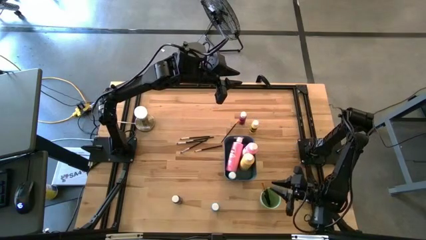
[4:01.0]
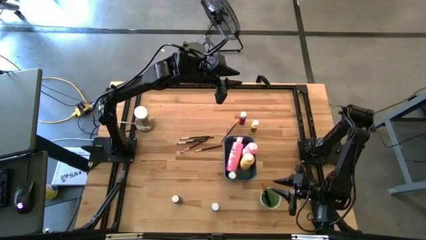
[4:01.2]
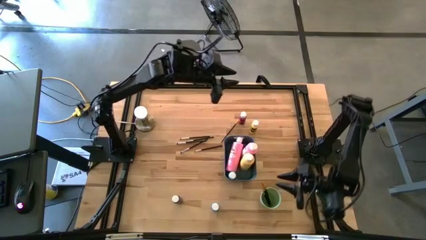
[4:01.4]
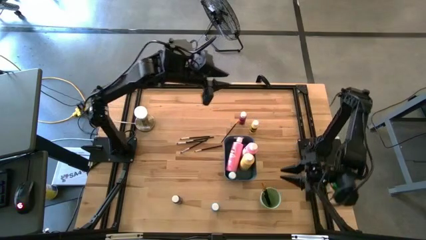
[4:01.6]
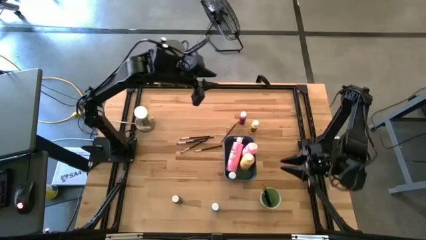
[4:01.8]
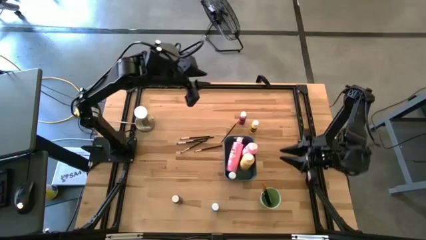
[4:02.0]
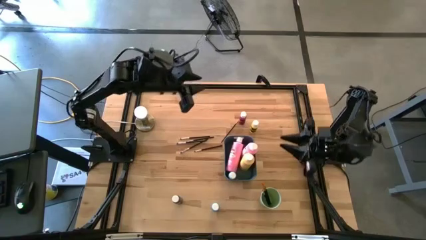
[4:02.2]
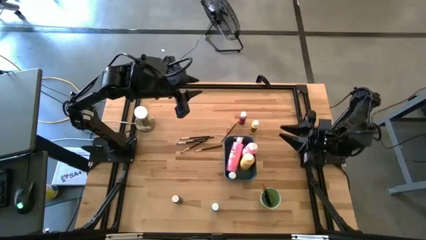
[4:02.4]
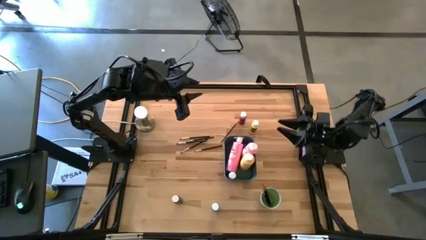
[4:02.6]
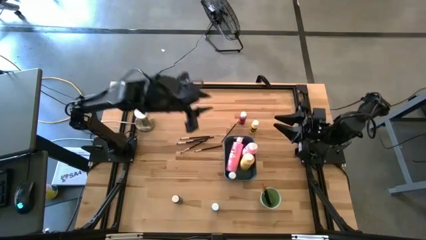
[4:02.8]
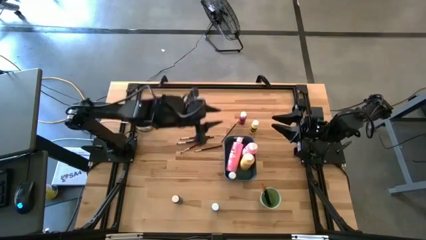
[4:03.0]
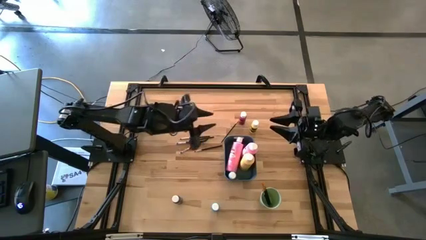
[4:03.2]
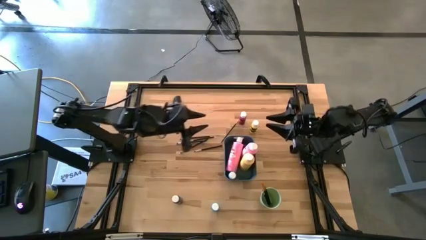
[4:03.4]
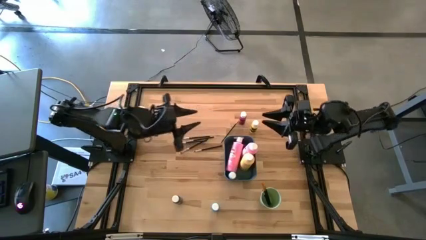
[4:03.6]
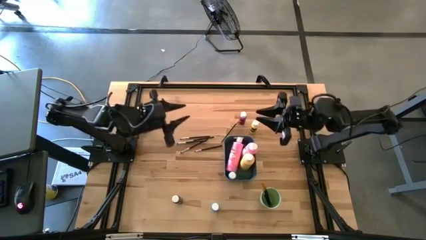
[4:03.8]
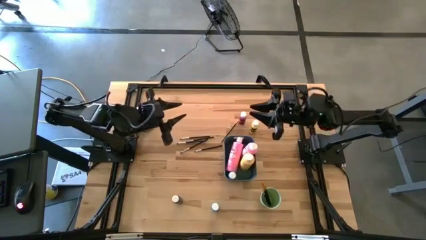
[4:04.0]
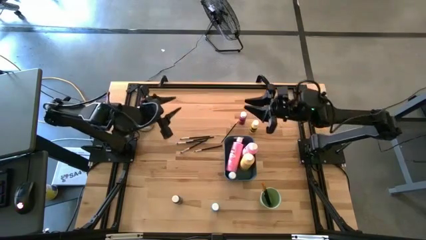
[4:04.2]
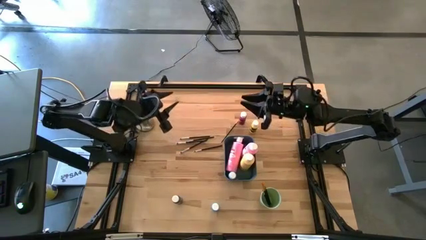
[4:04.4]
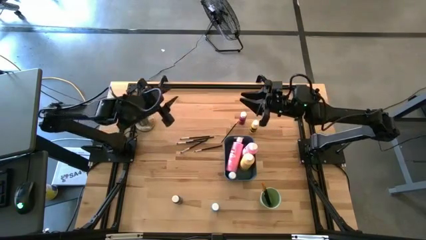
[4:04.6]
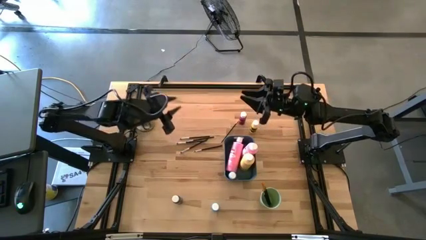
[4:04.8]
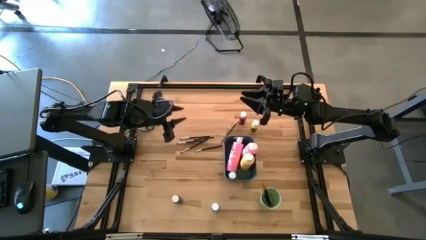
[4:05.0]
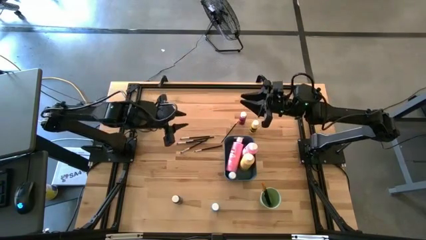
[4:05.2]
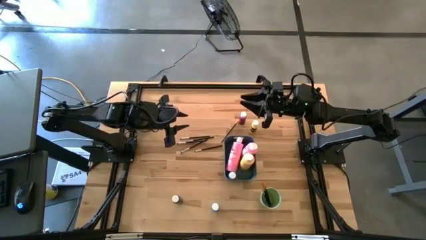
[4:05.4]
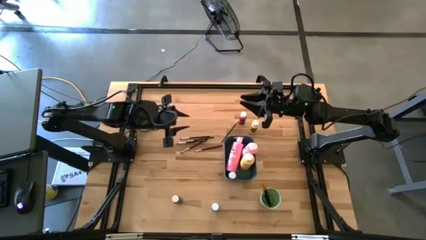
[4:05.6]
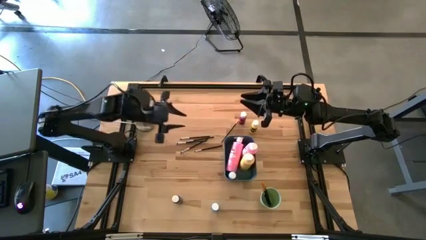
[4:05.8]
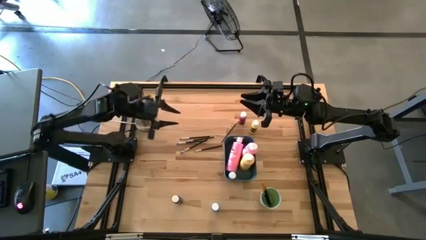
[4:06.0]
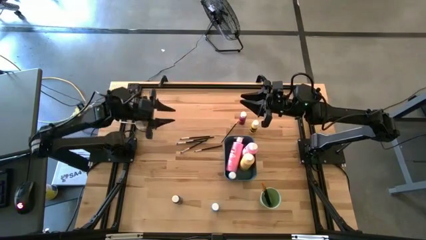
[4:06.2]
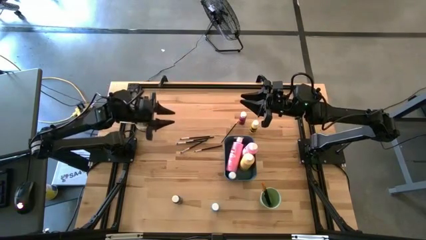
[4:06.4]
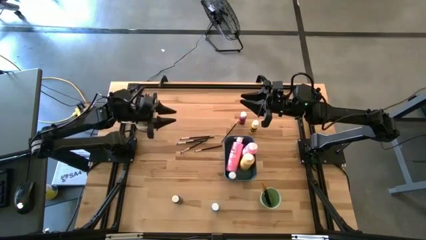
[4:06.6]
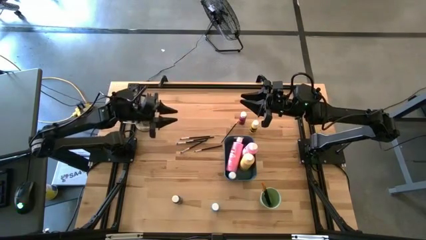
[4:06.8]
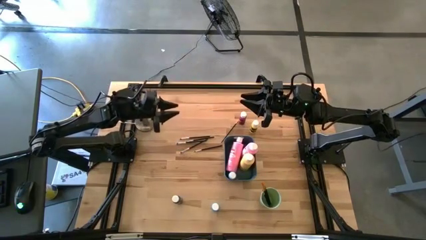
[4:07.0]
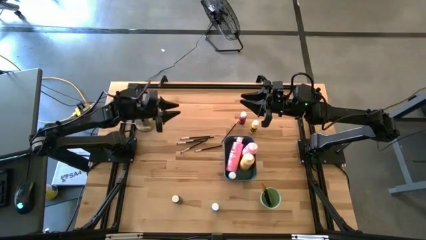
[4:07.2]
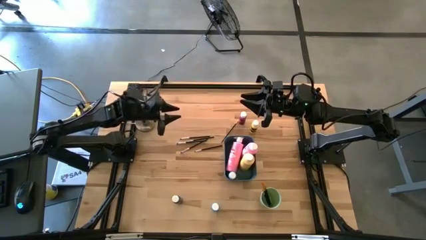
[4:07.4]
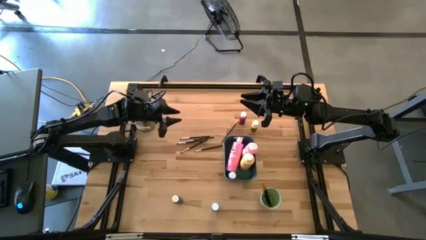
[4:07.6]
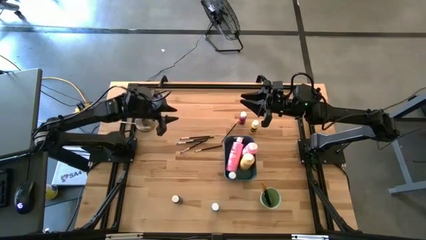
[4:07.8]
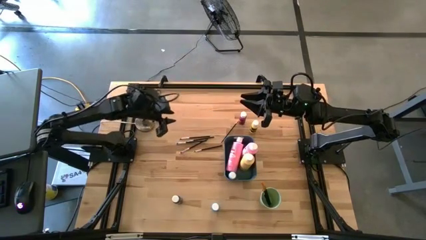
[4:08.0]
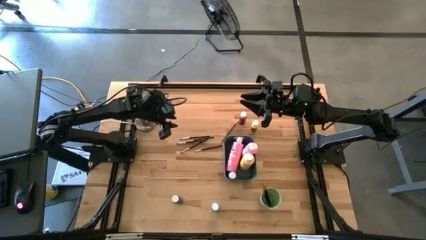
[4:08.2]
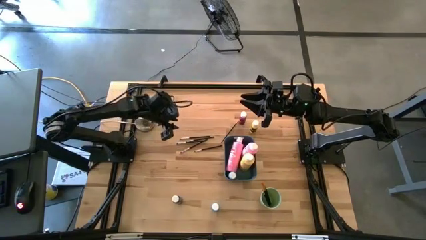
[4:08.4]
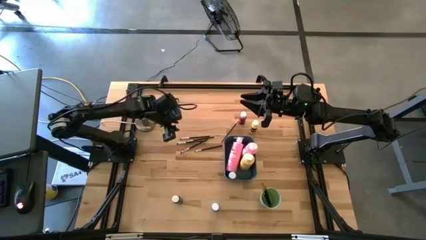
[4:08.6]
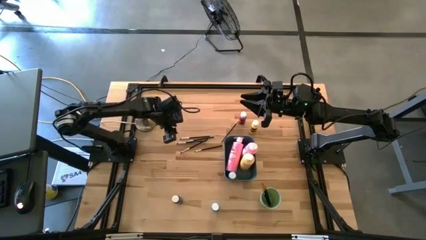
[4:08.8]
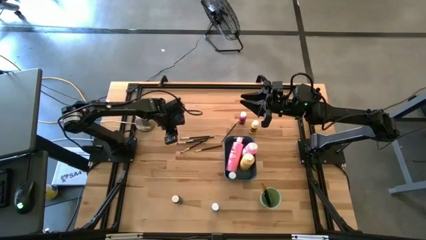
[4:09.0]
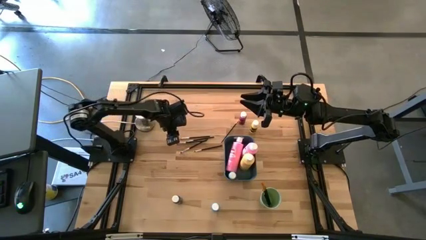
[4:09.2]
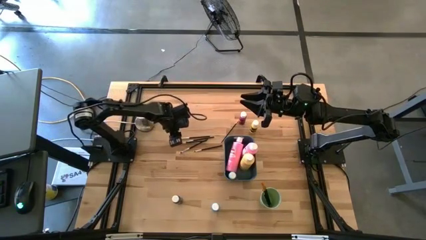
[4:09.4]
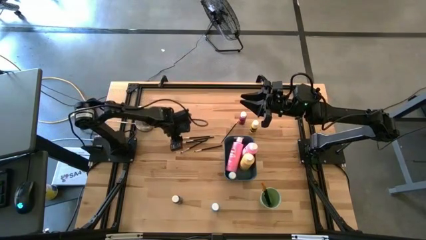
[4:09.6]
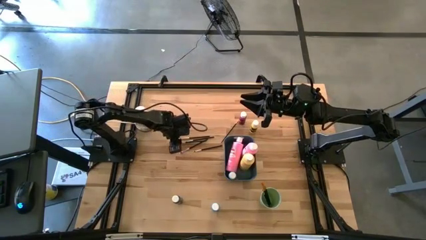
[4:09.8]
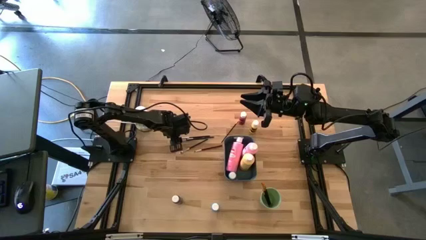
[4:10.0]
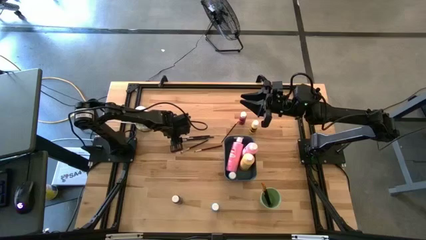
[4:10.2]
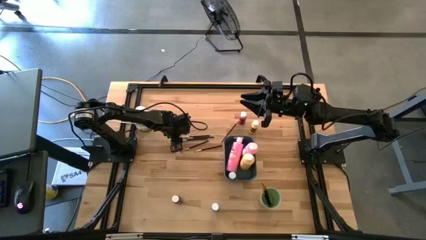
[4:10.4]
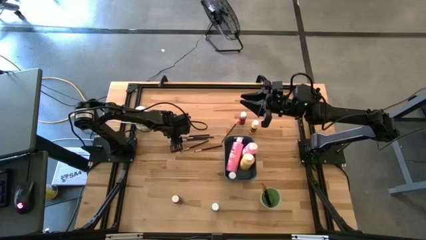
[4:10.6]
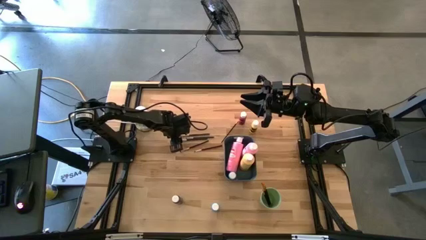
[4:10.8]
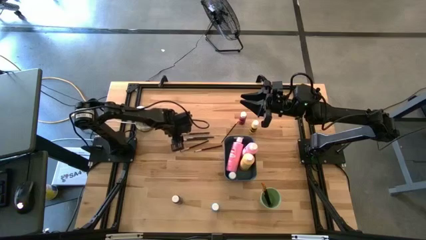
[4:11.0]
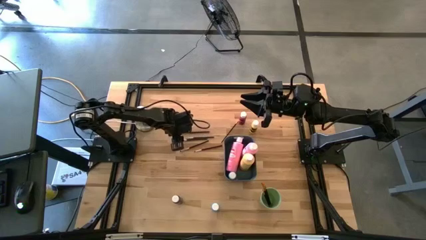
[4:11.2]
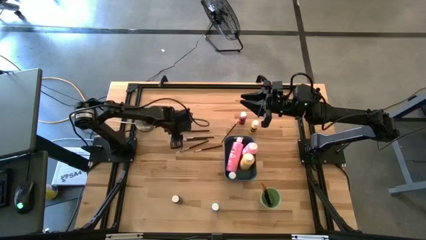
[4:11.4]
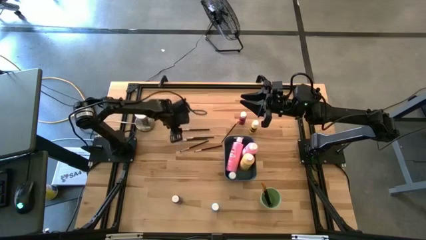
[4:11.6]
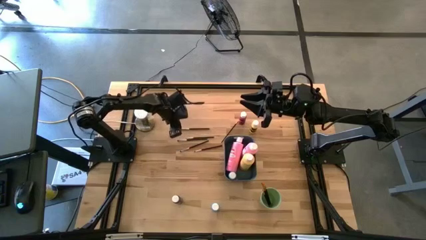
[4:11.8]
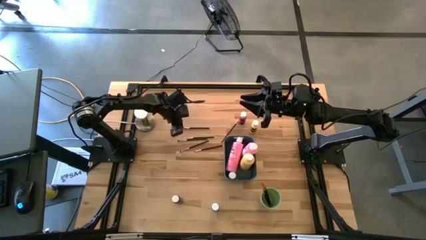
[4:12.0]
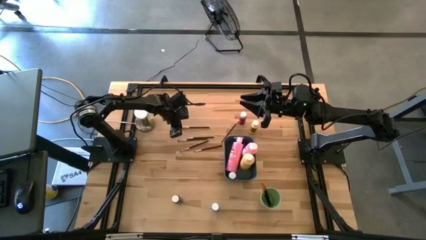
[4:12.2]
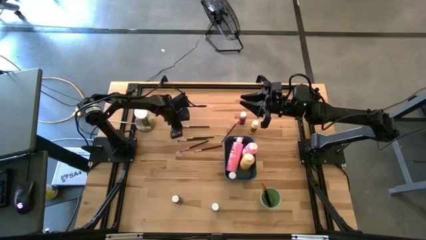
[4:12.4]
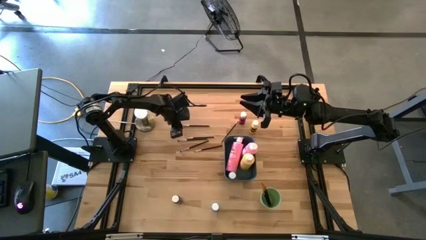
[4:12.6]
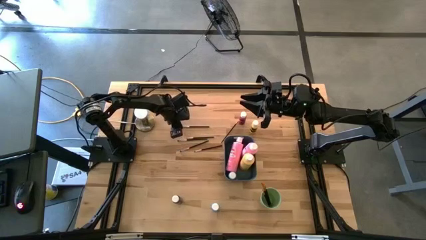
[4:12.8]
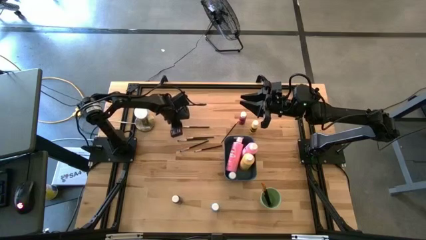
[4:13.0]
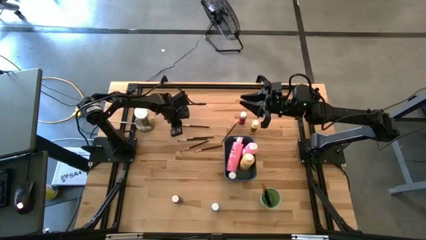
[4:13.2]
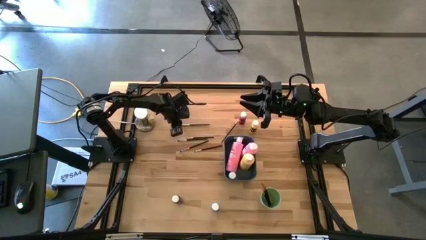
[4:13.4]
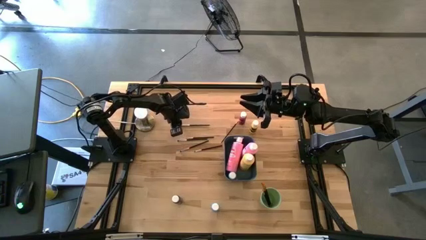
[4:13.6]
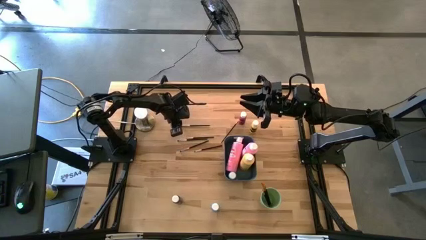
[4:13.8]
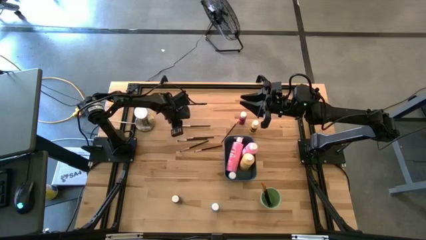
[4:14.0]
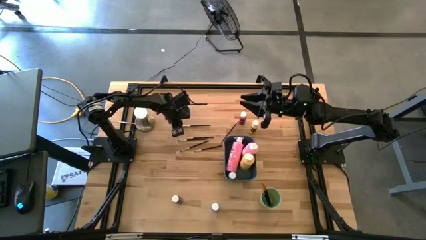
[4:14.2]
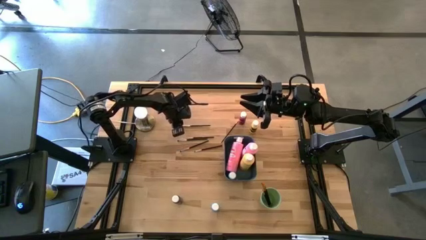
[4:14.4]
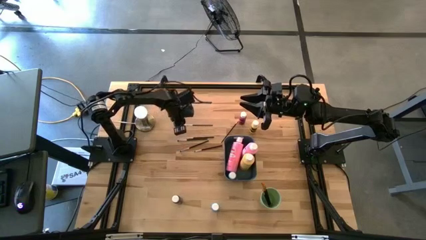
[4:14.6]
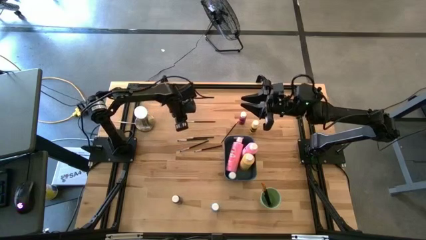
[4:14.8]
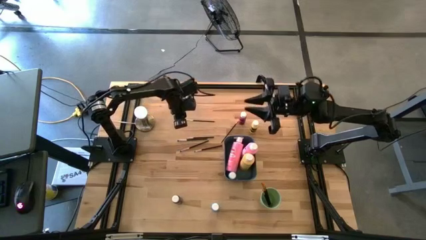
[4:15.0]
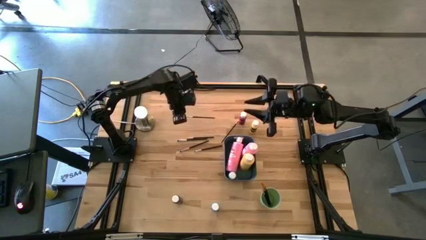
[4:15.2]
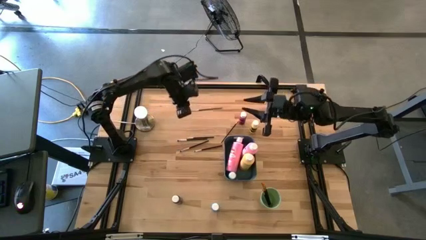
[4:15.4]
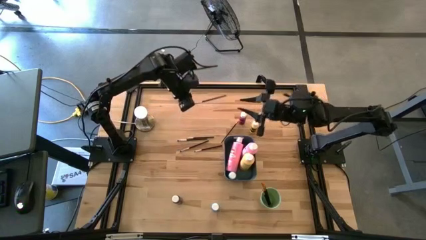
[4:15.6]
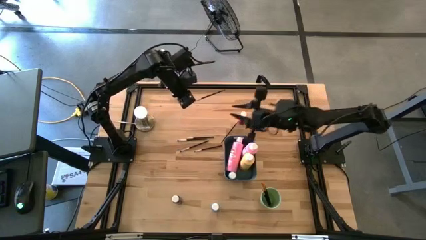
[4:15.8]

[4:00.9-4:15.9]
Task: Pick & Place Paint Supplies
Put the black and silver paint brush into the green cup

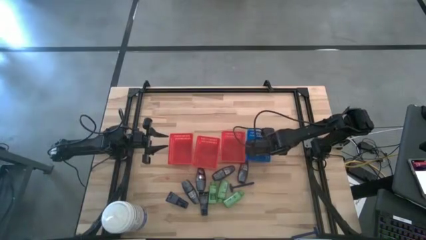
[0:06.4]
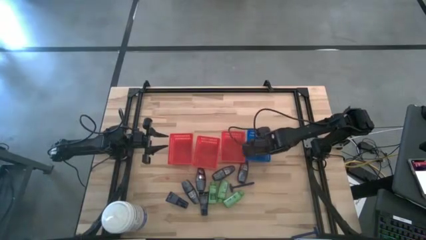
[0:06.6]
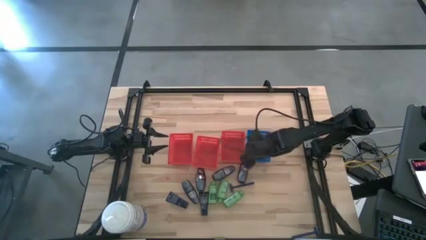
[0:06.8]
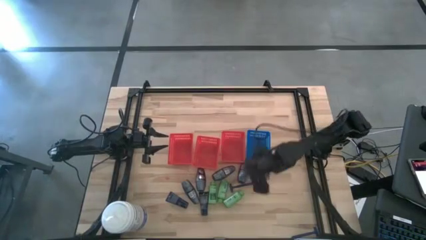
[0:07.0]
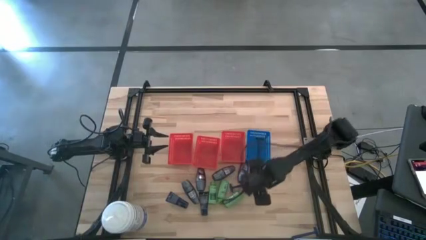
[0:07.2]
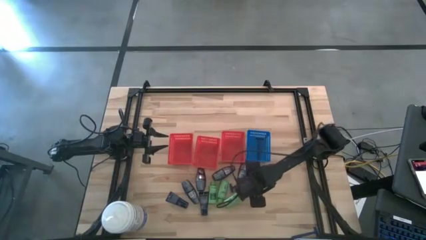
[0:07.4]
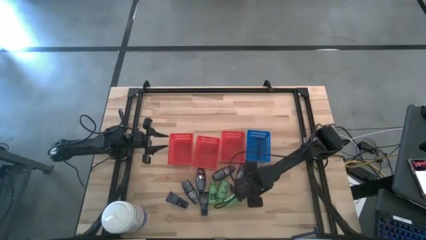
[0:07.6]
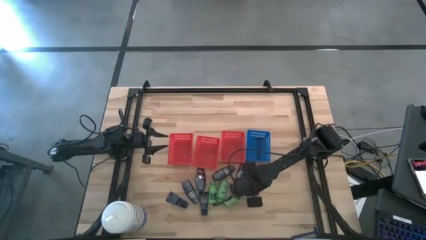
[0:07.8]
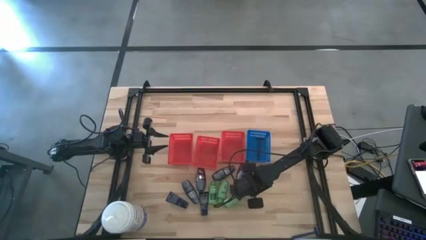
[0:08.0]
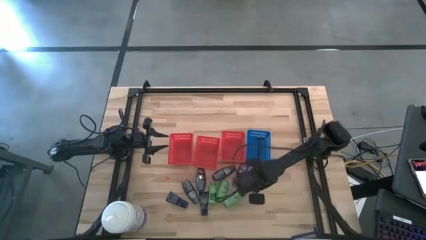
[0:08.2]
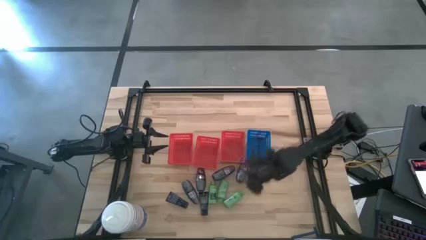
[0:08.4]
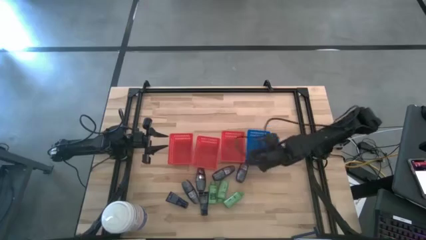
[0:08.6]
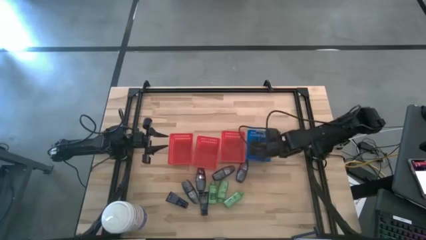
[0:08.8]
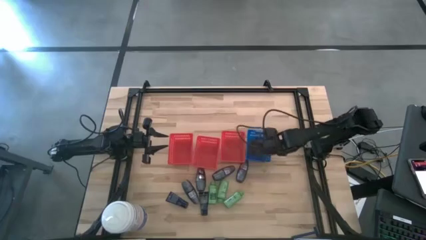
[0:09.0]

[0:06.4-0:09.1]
Task: Pick & Place Travel size toiletries
Put the razor into the blue bin
